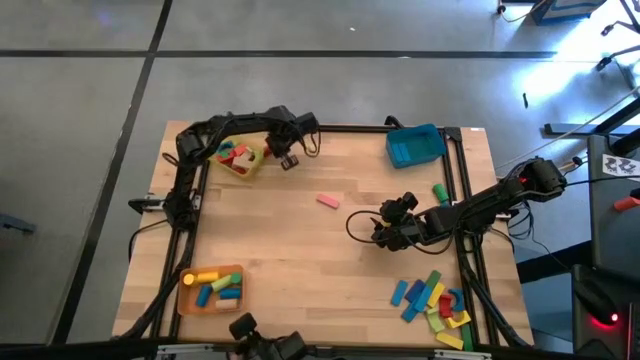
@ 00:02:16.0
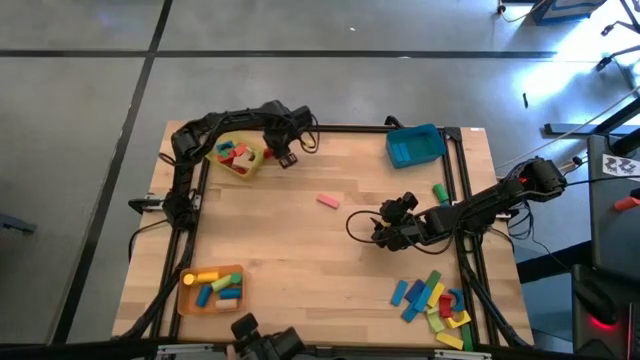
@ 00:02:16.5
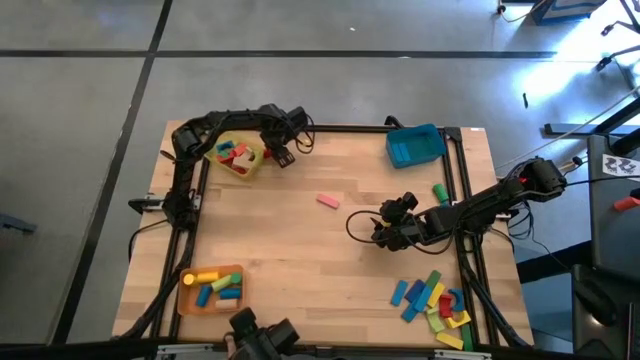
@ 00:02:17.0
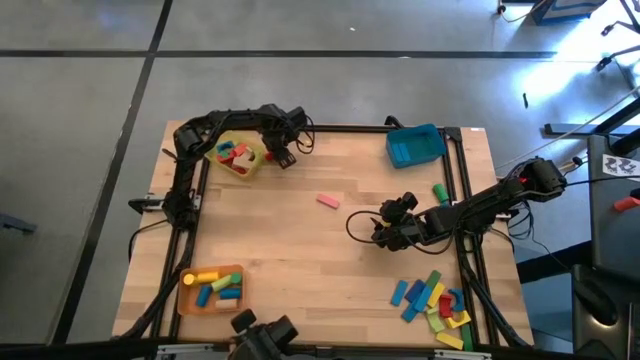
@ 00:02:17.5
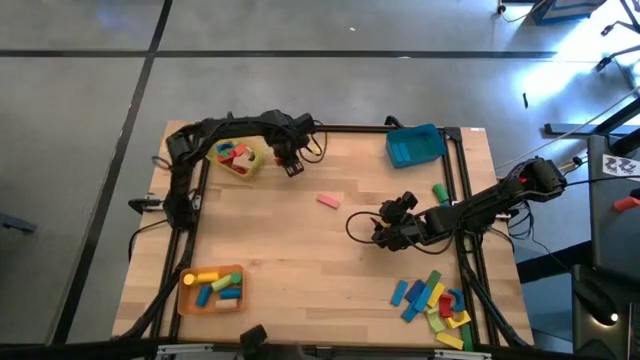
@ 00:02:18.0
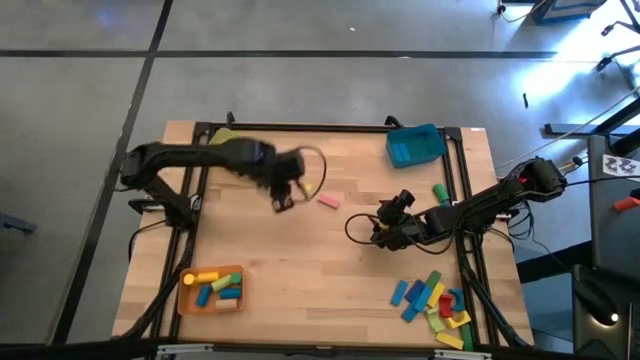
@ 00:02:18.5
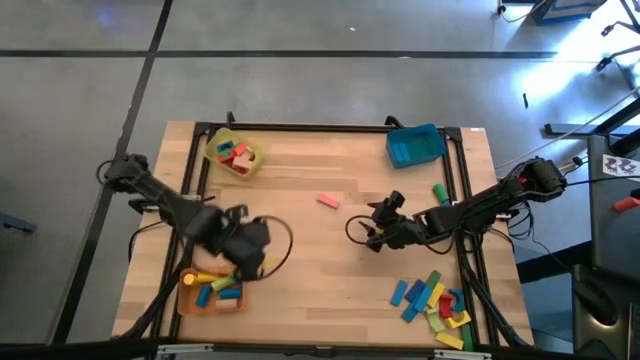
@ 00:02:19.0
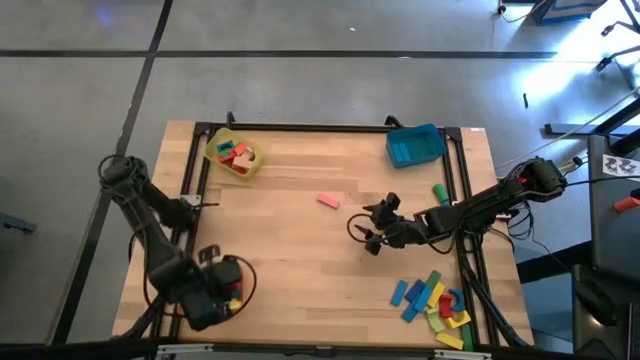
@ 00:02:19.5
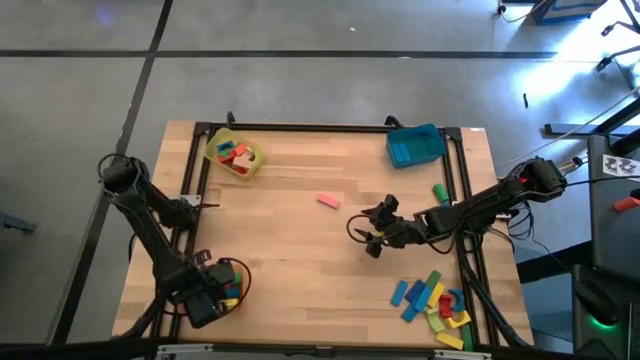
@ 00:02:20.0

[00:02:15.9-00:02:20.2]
Task: Sort blocks by size
Put the red cylindrical block into the light orange bin

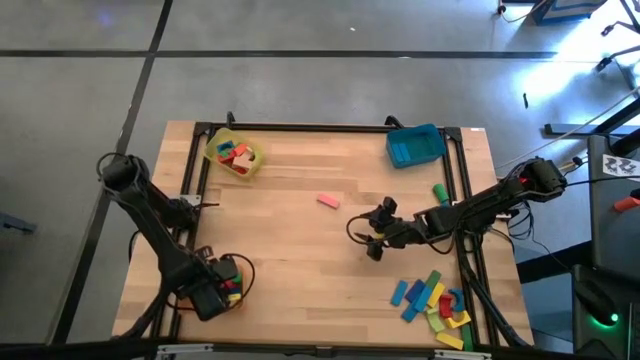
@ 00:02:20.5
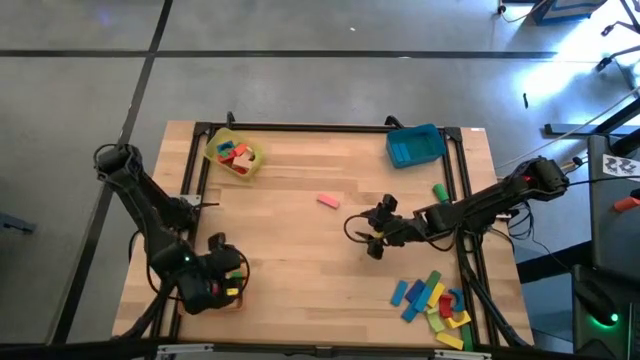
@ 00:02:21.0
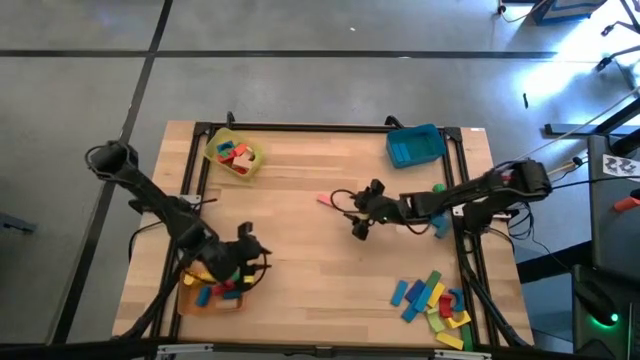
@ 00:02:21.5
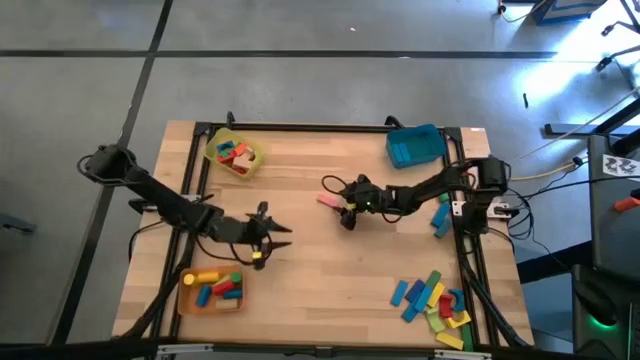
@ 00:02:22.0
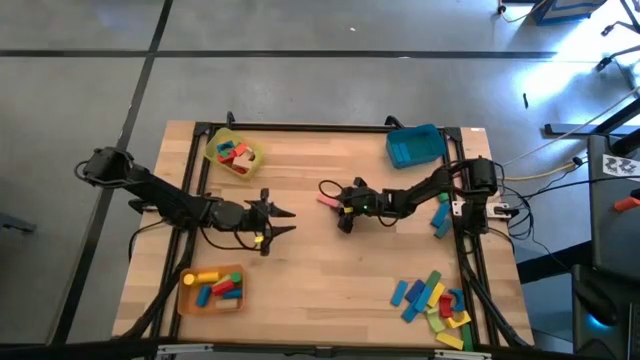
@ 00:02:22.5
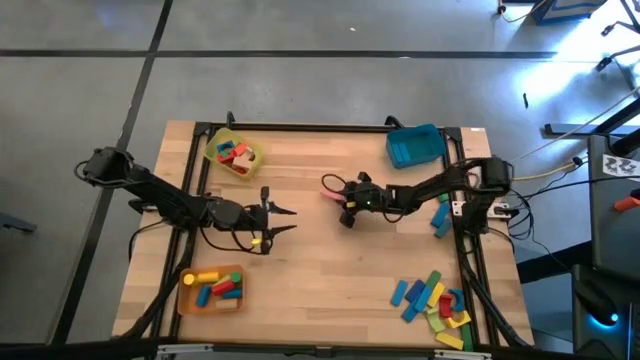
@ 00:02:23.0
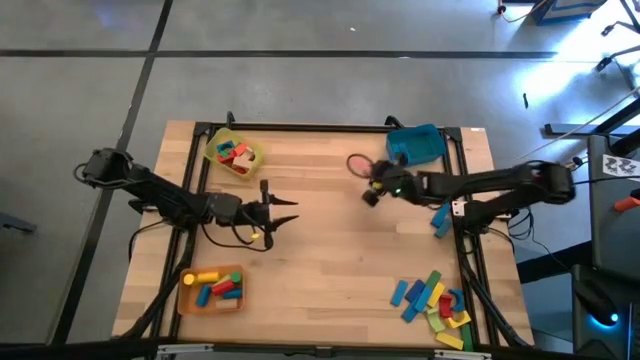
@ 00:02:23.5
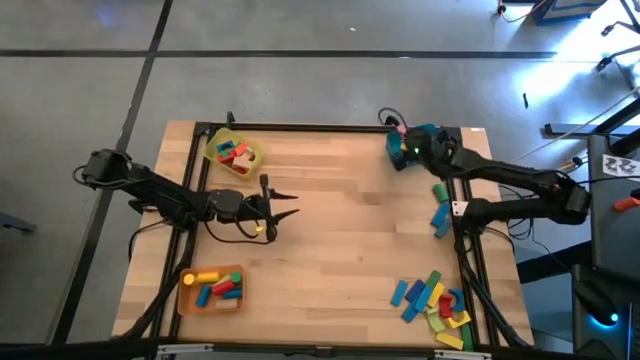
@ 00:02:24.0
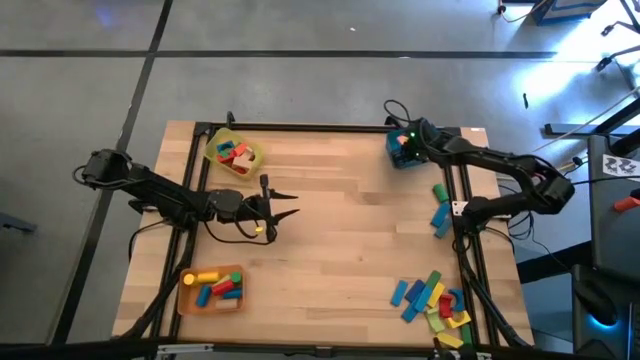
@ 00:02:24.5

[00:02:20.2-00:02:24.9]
Put the pink rectangular block into the blue bin

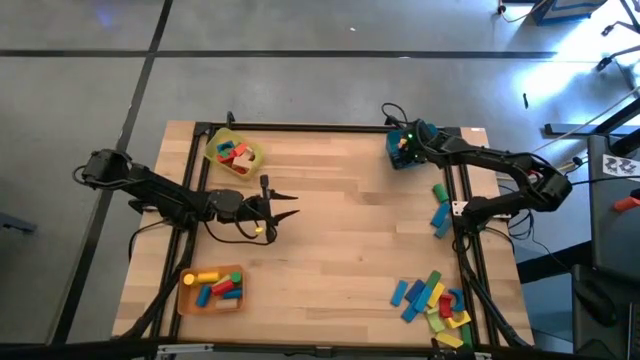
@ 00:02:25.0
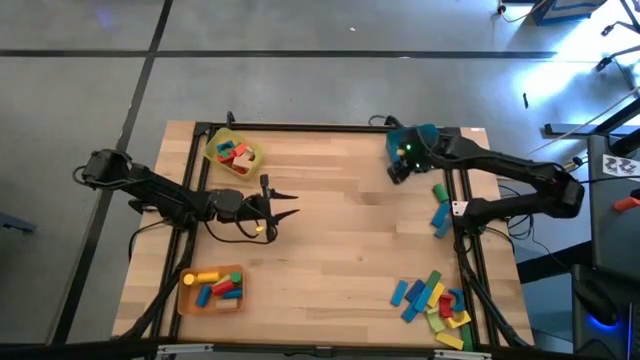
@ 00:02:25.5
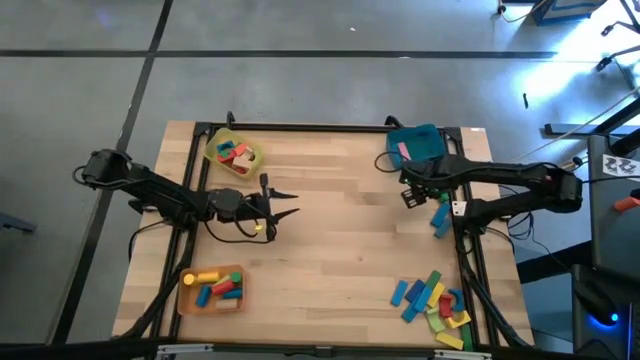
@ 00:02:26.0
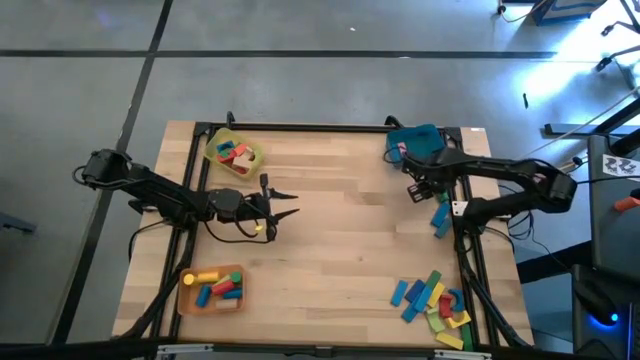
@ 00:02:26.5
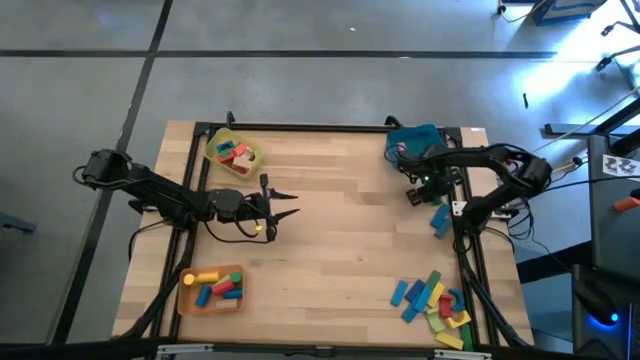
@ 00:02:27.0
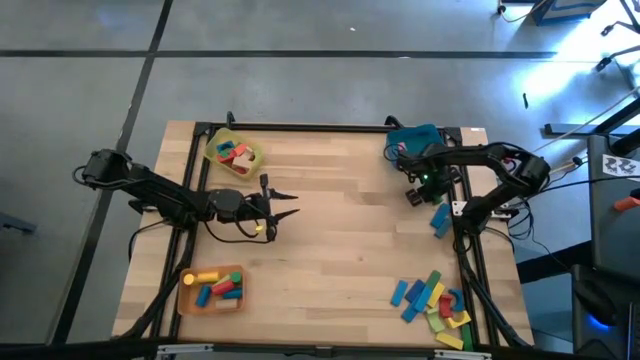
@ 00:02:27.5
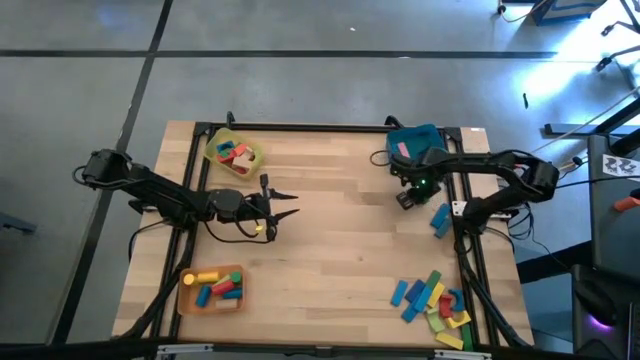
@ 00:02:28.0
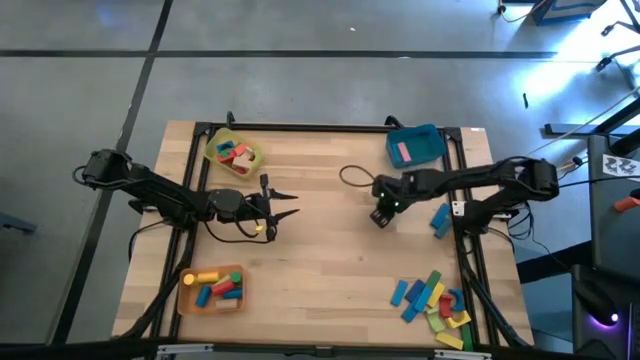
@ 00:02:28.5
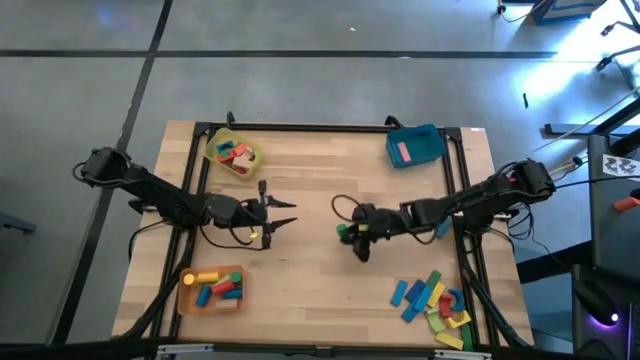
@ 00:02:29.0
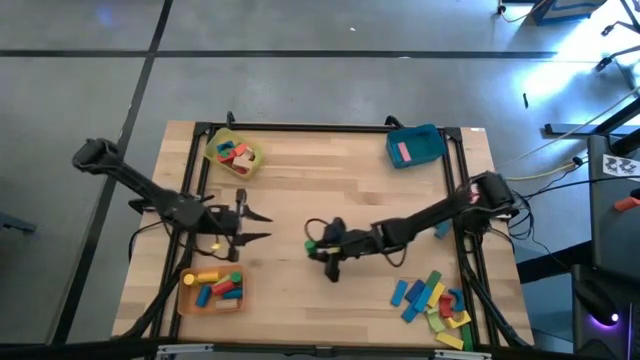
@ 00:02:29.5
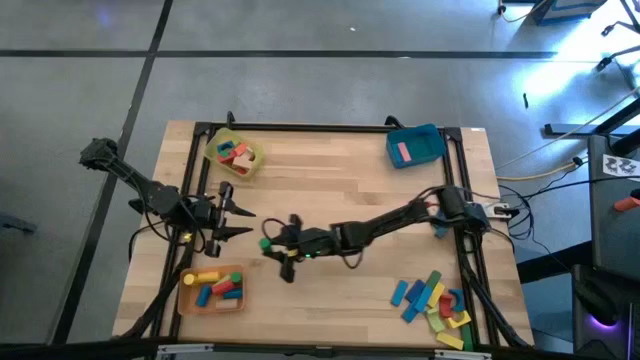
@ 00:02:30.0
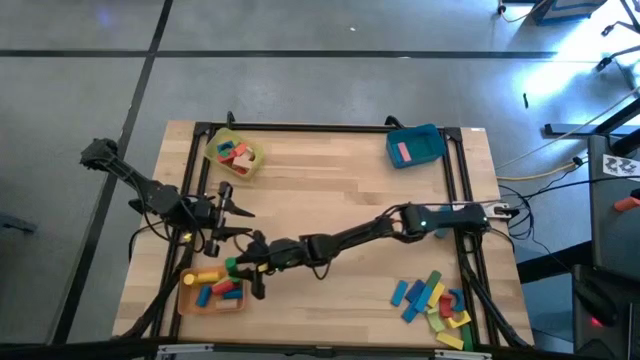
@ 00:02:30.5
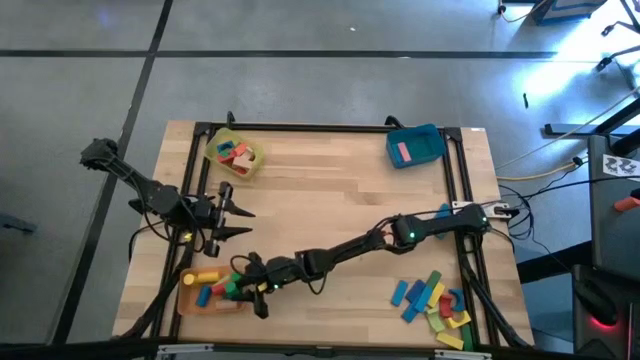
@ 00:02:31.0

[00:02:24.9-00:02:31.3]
Put the green cylindrical block into the light orange bin

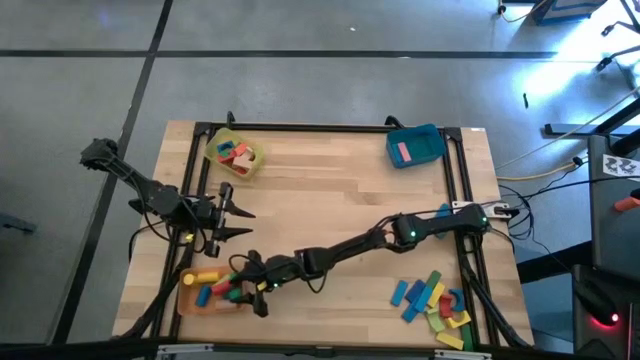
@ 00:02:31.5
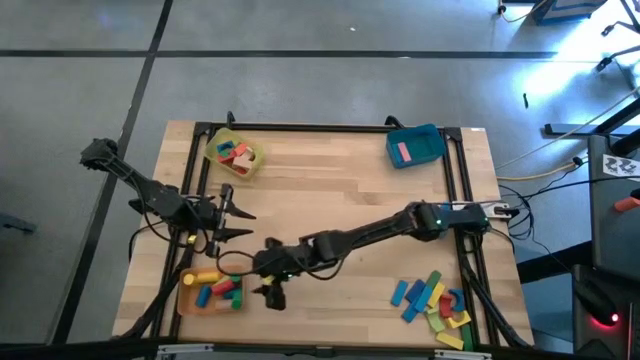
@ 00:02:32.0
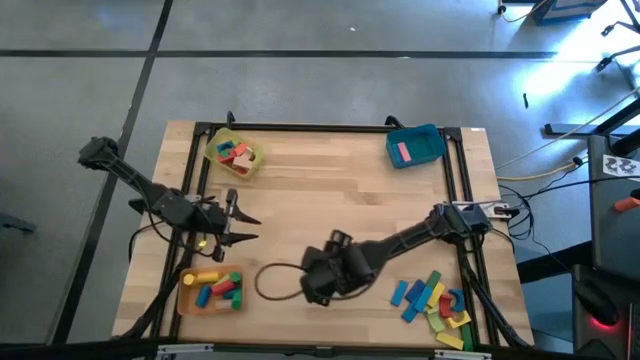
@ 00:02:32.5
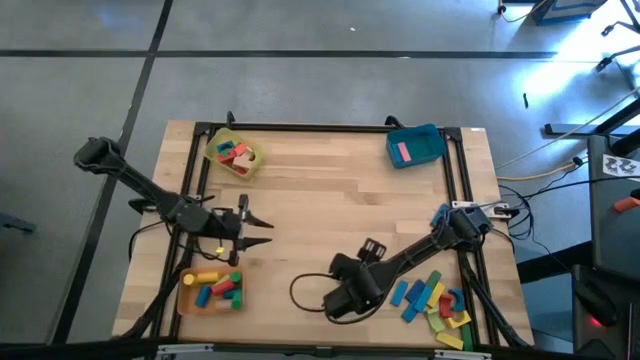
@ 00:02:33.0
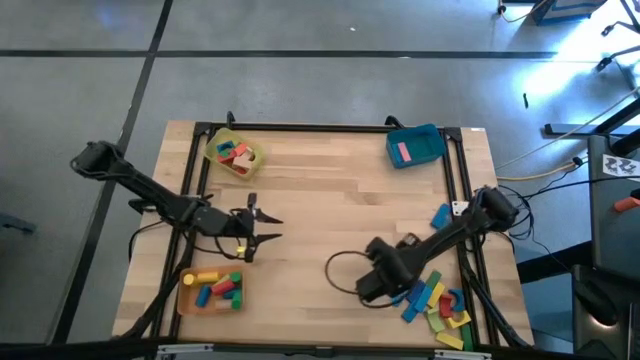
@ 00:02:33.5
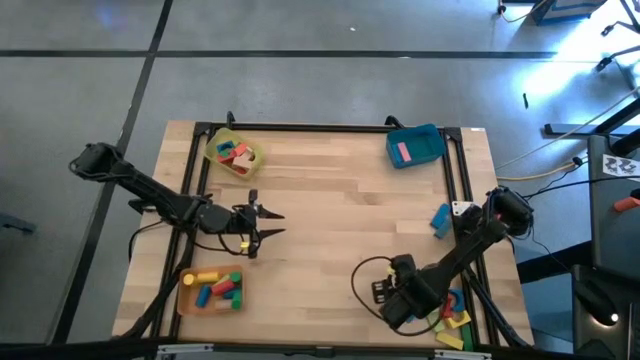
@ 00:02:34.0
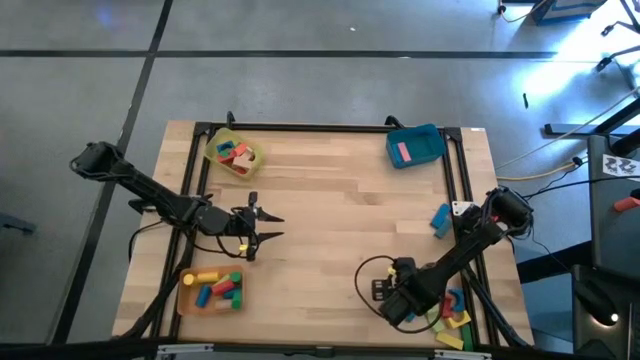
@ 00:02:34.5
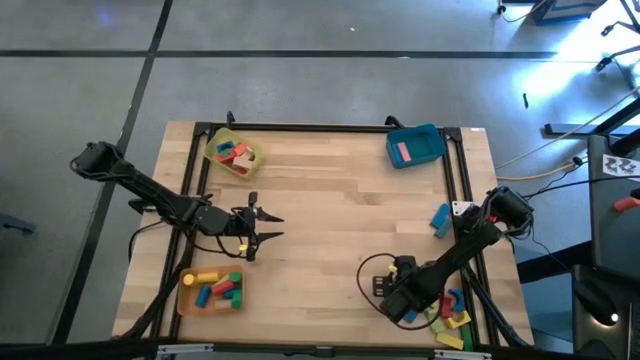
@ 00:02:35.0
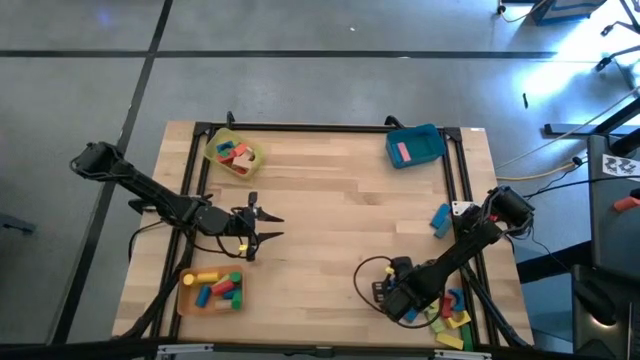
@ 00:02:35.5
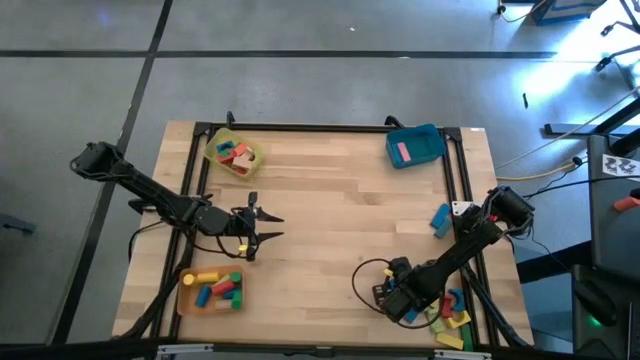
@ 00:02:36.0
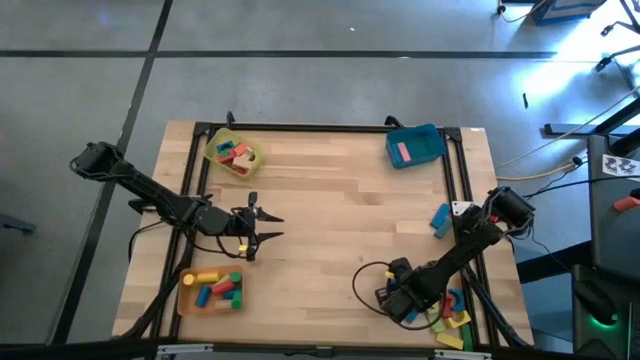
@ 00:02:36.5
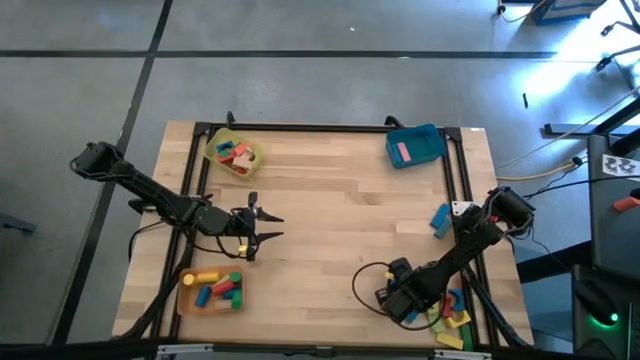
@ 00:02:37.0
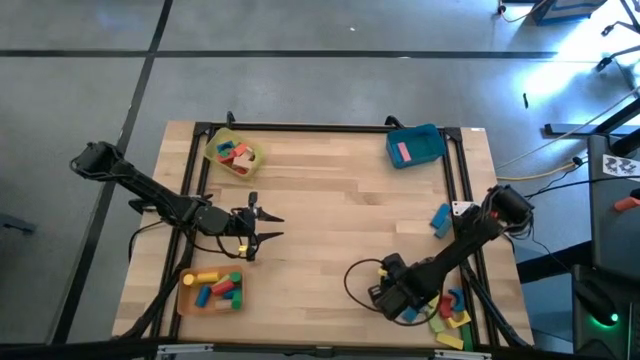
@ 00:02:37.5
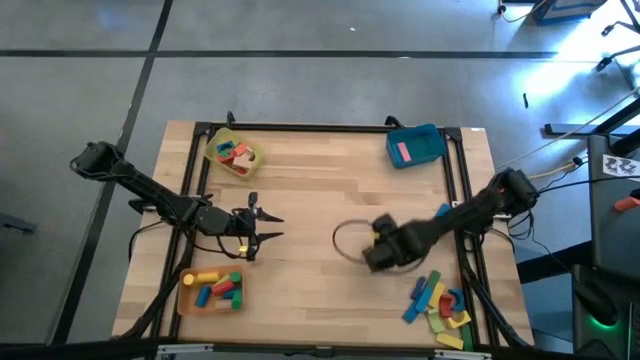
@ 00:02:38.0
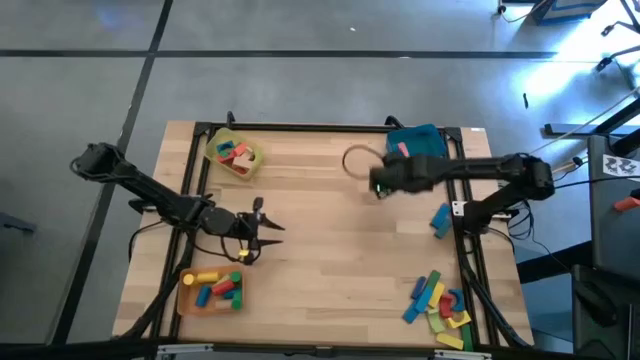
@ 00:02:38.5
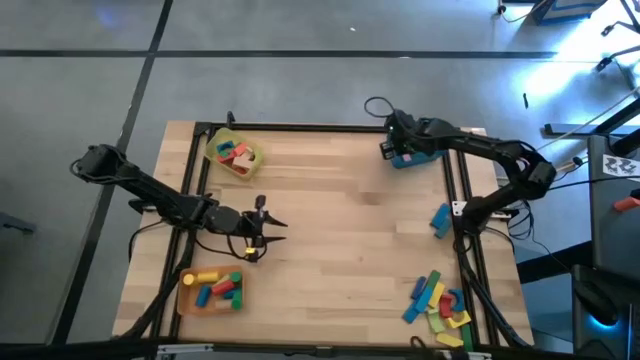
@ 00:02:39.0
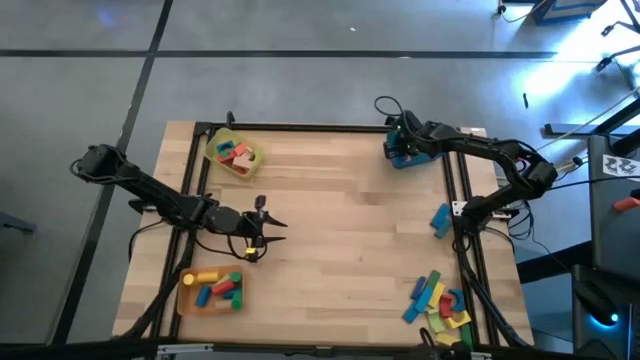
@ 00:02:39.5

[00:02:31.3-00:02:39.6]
Put the blue rectangular block into the blue bin
